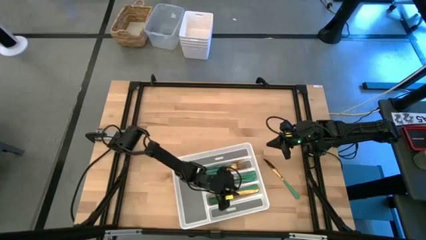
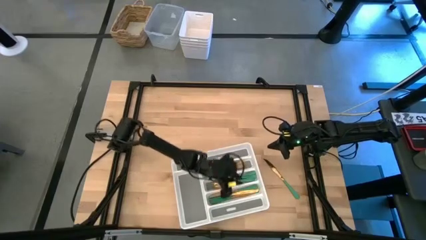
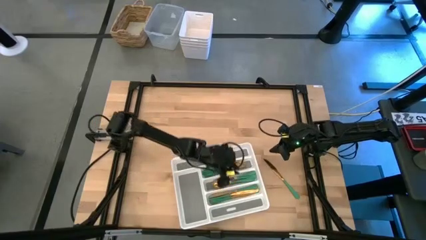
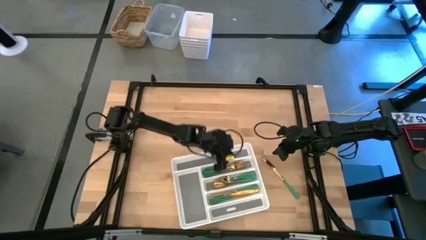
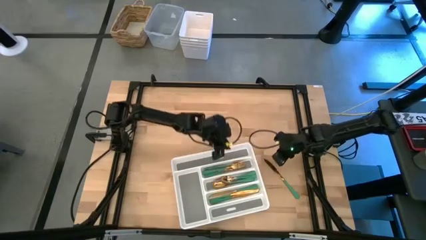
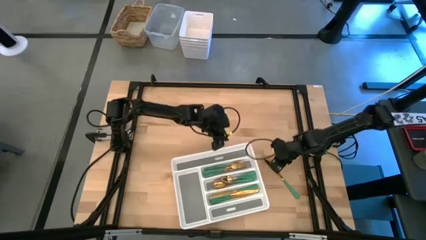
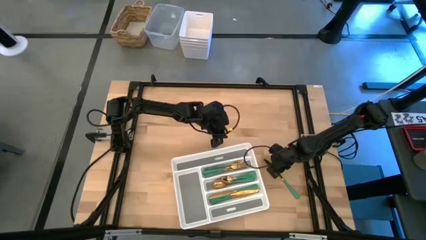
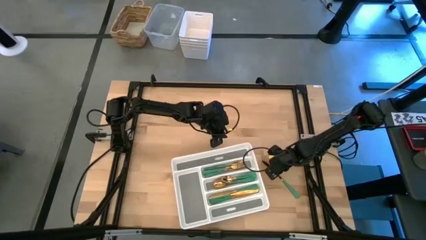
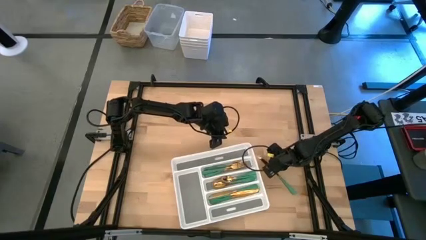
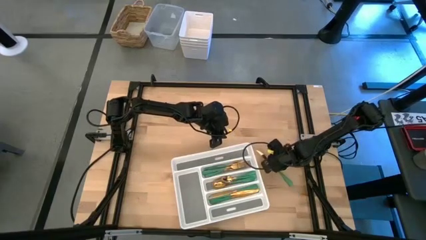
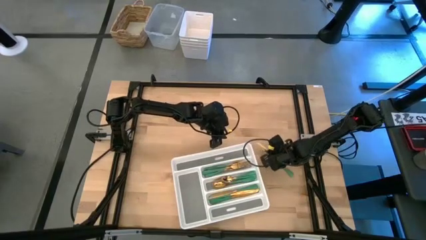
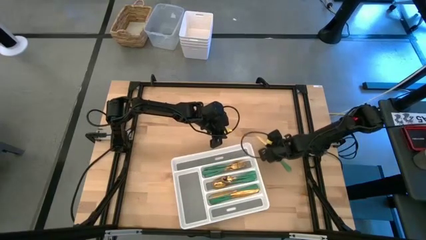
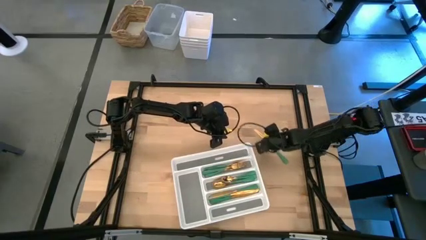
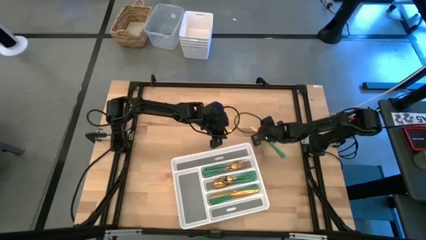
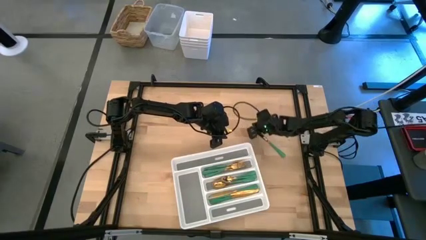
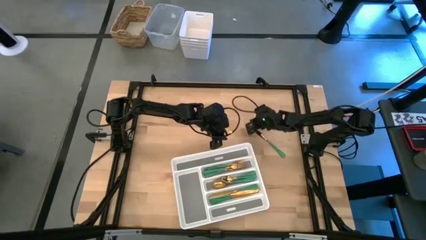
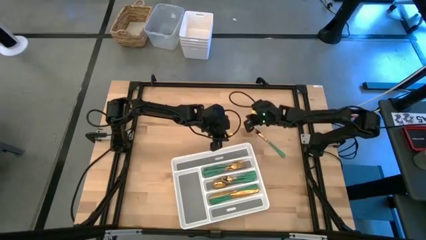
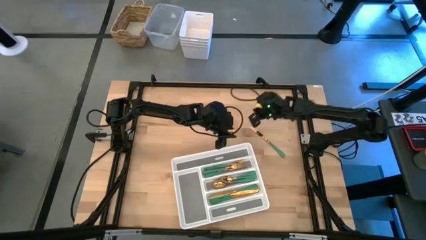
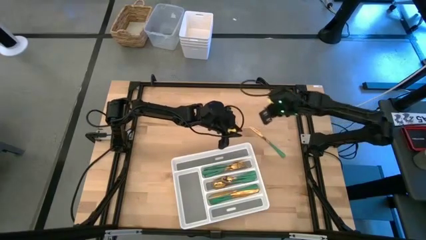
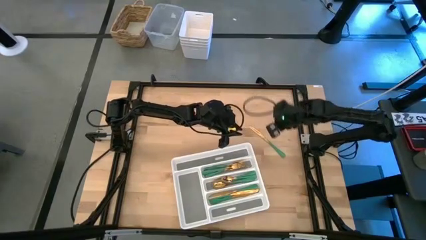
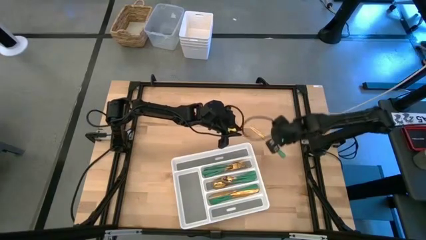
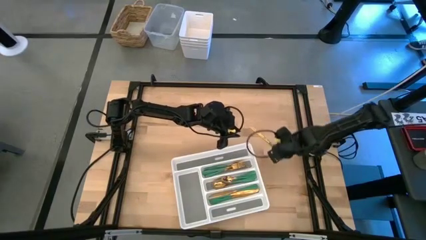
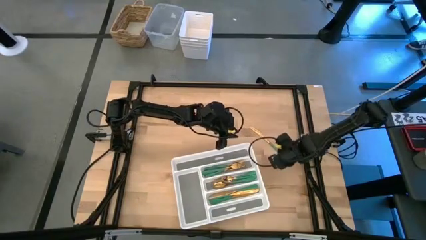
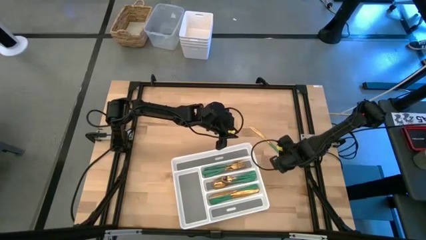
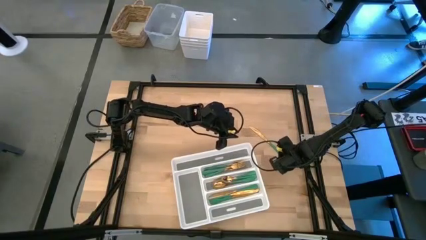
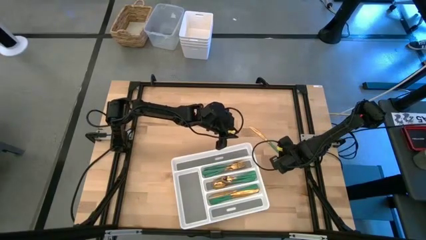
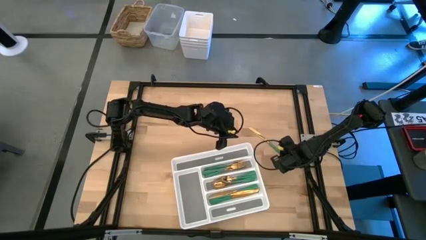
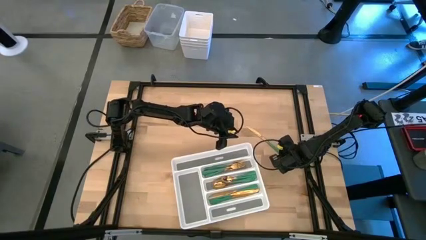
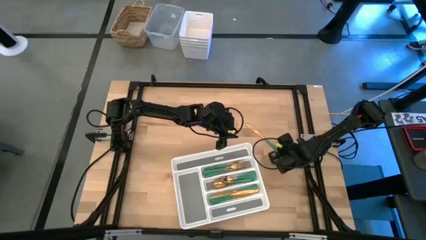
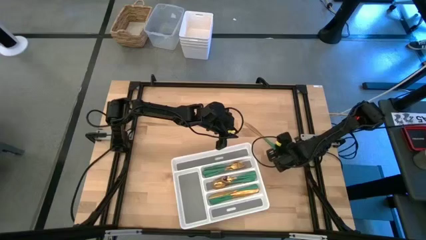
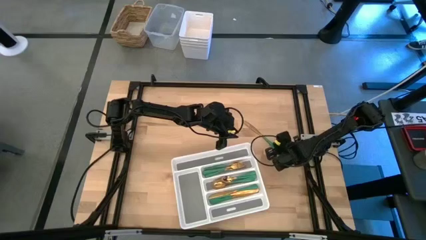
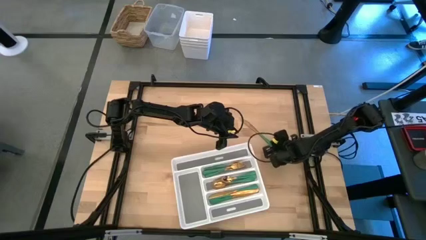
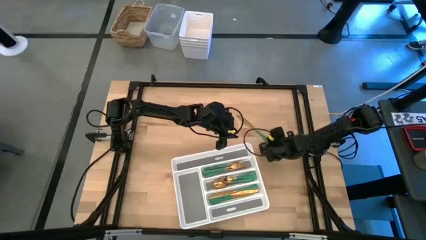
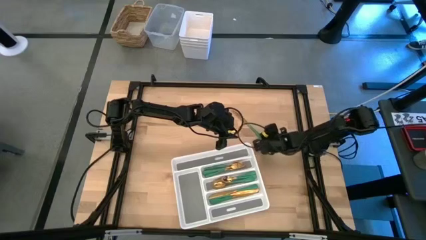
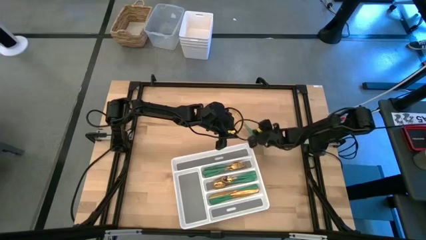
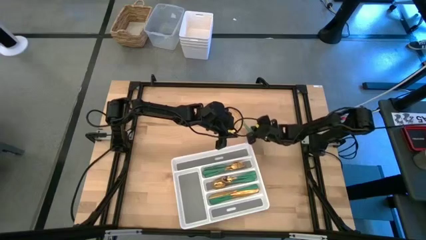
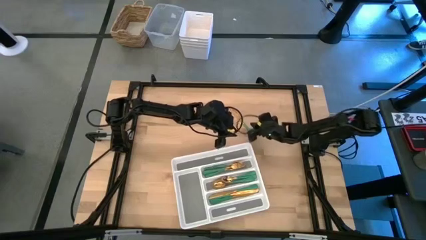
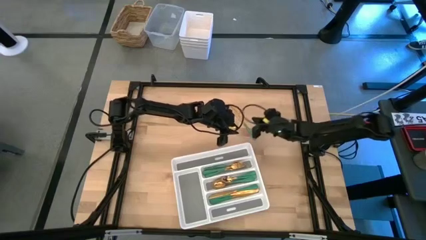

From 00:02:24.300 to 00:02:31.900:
Task: Sort silverware
Move the green spoon from the right to the top of the table

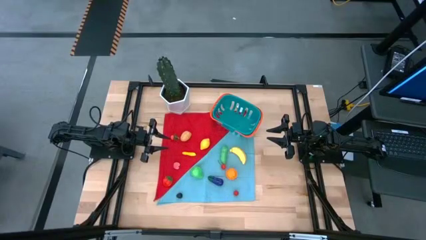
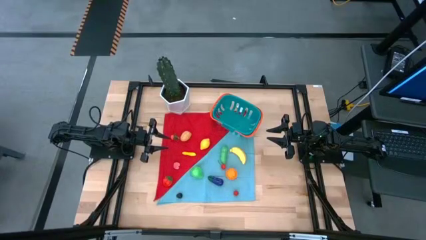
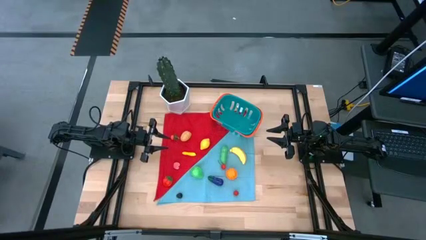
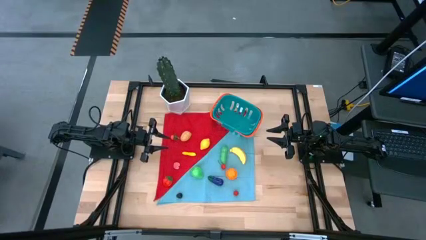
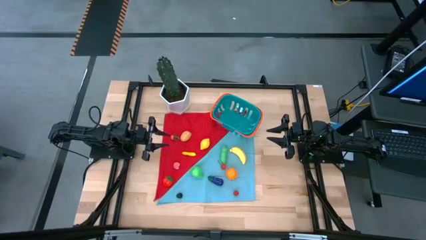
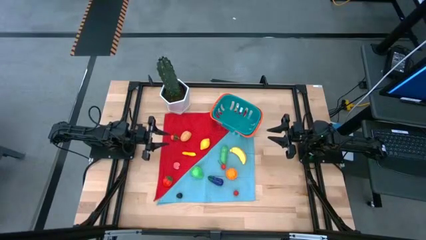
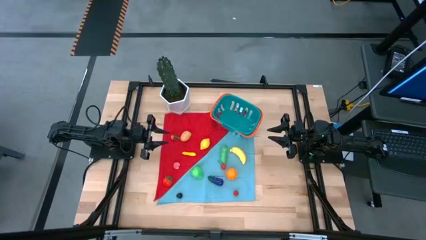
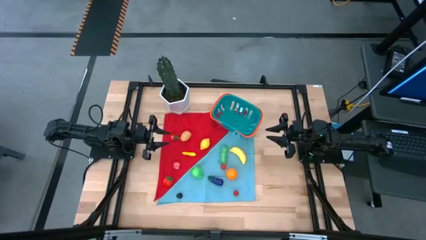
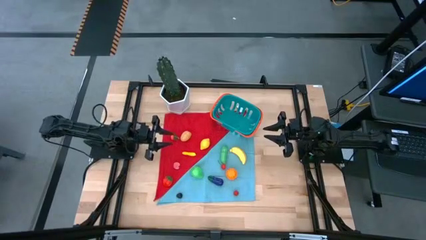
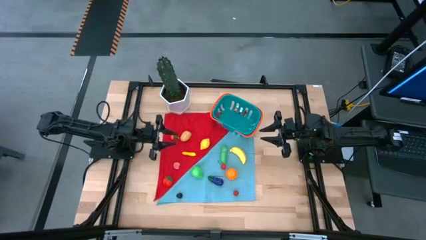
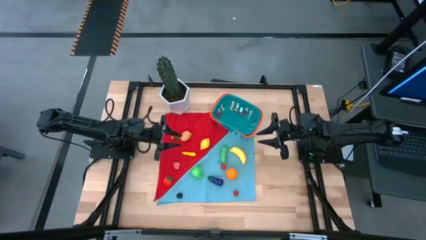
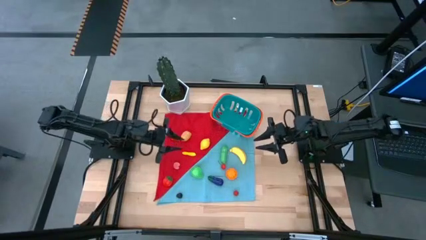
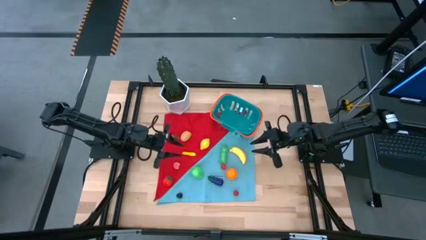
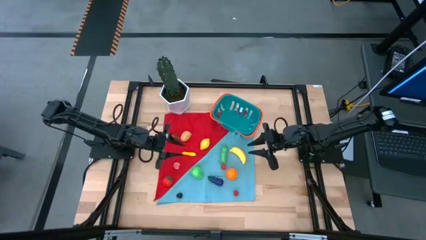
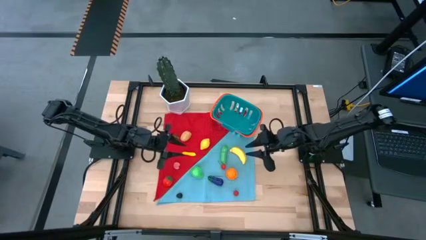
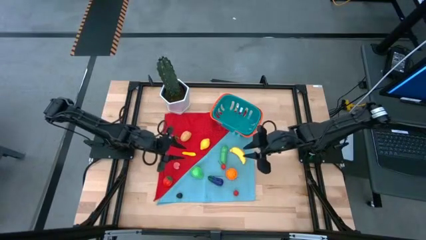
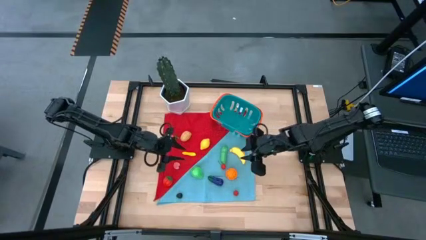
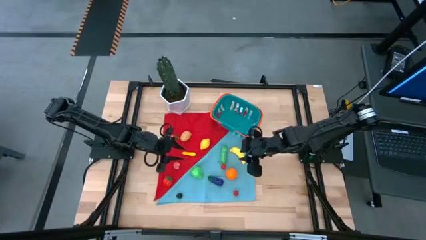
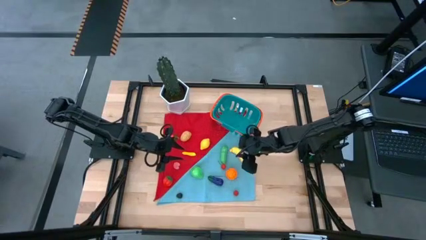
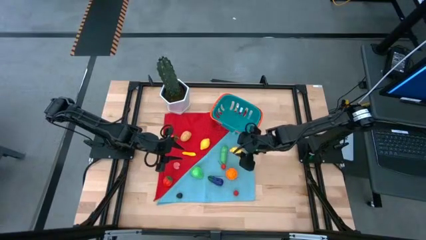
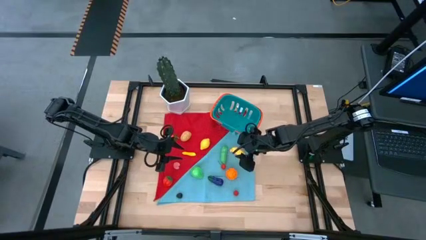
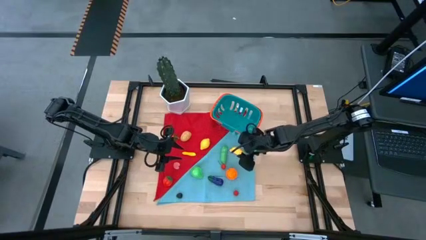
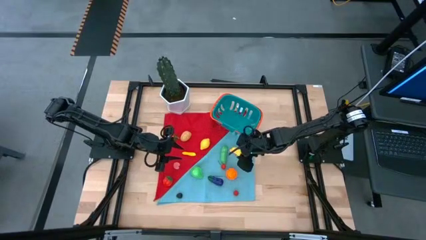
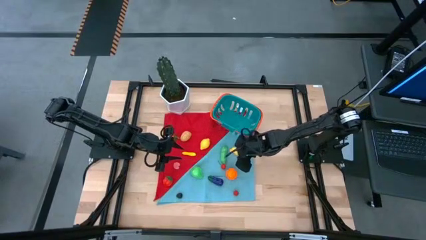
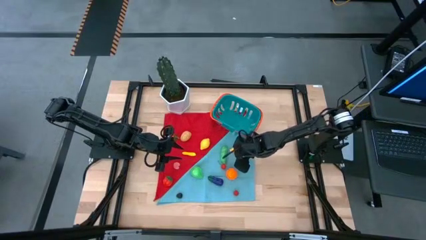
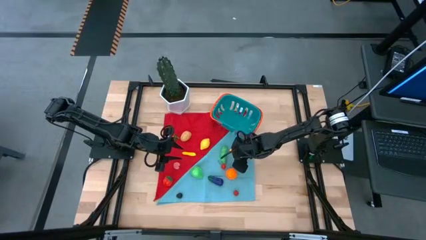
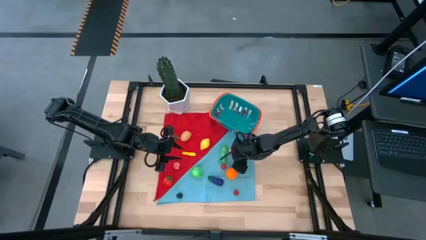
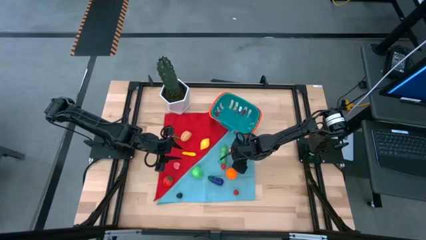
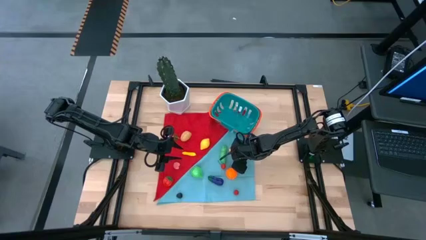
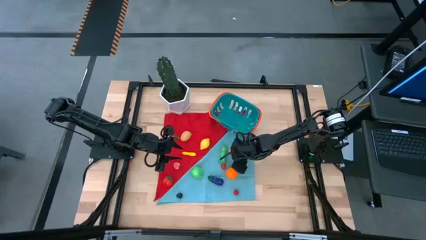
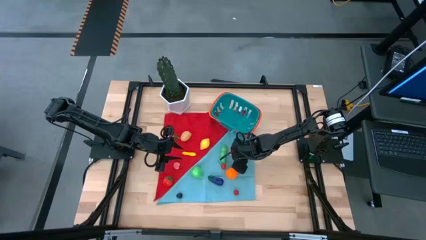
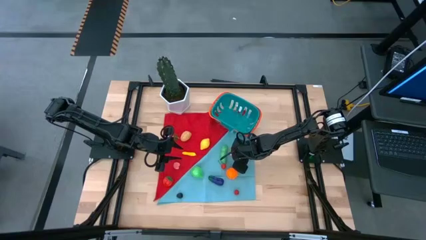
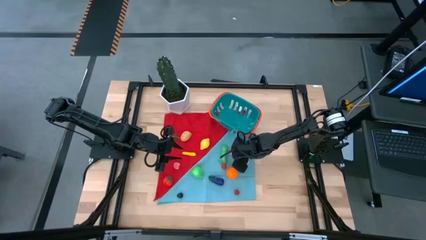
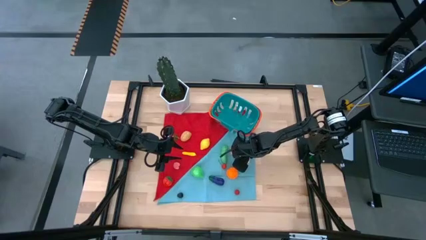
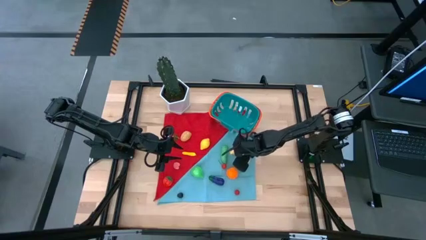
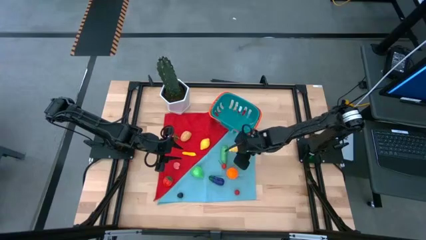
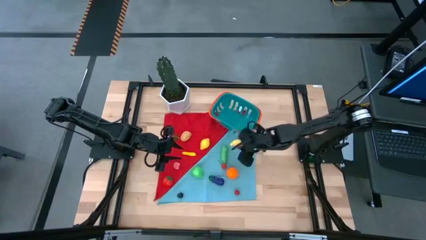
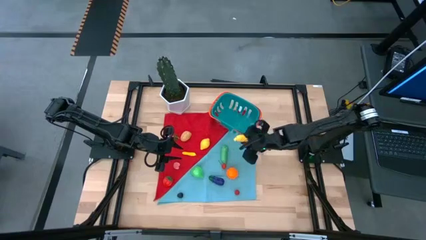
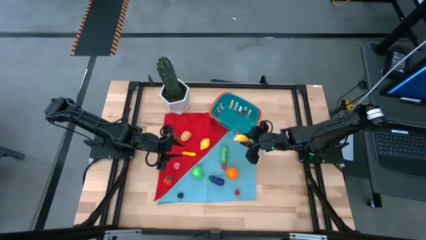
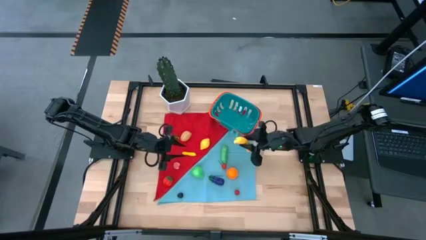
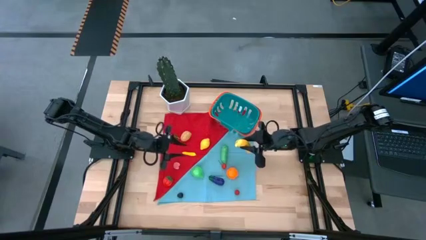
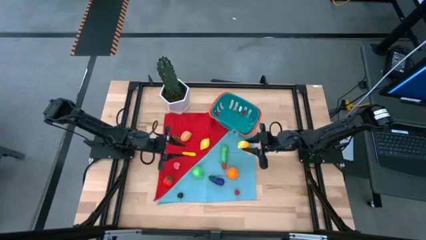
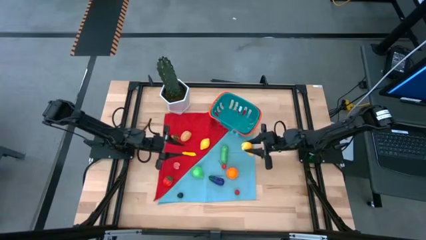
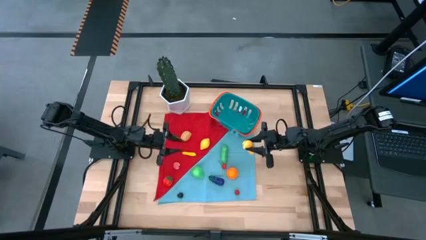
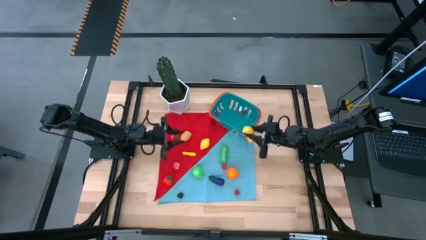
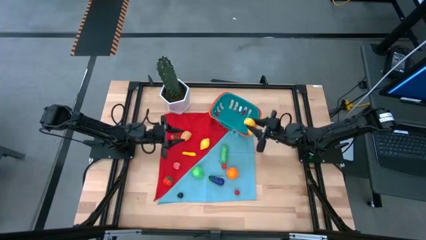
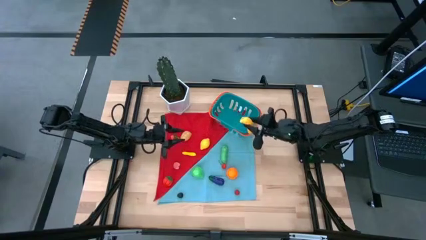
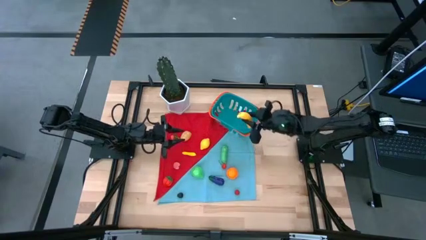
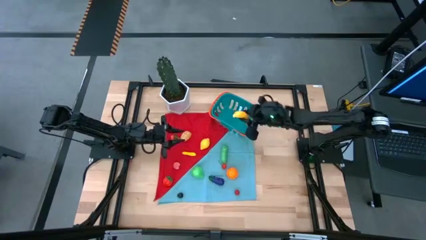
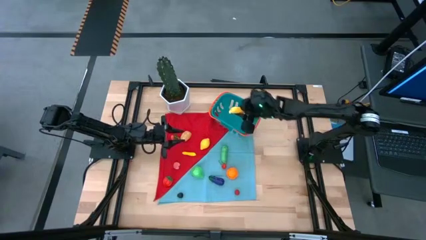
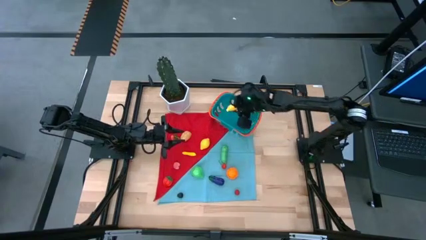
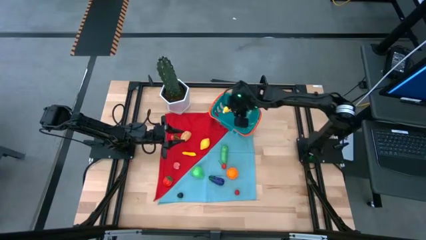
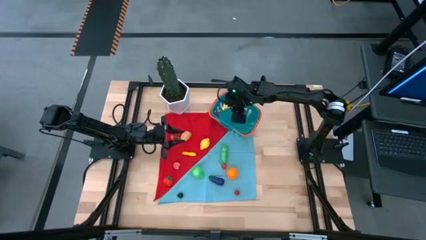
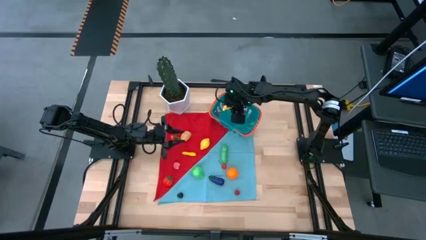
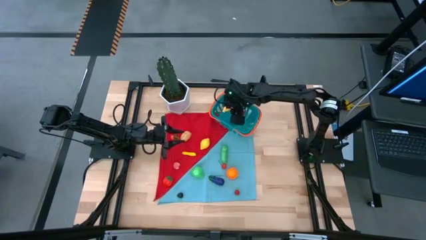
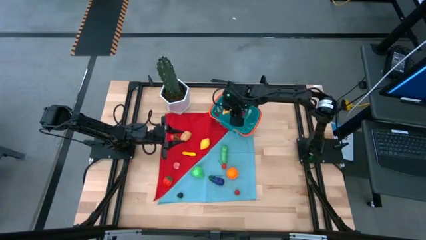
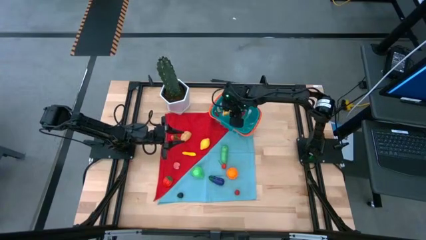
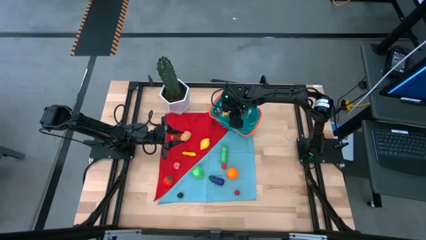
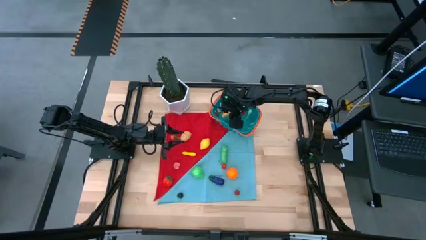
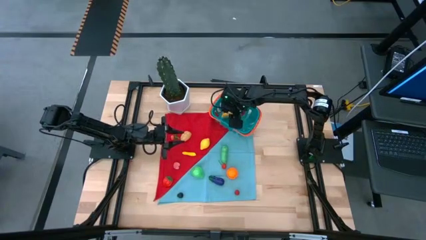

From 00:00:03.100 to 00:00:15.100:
Task: Pick and placing Produce into tupperware
Put the yellow banana into the blue basket
